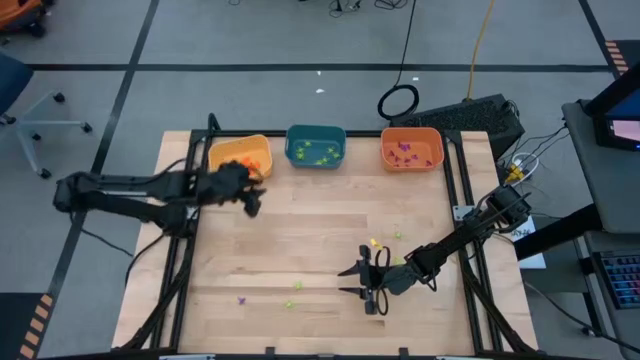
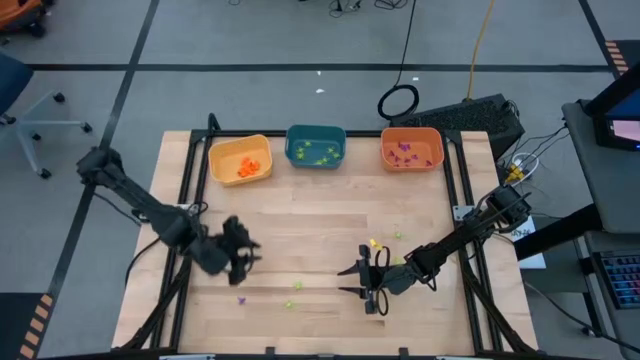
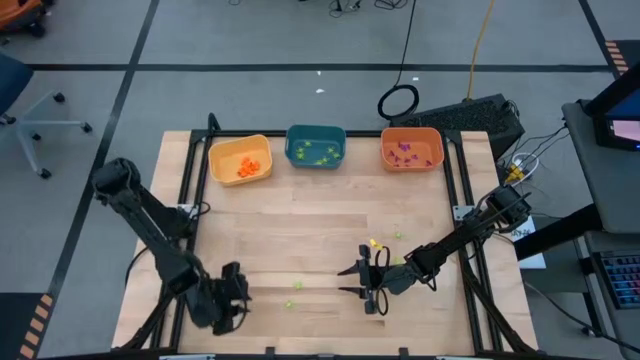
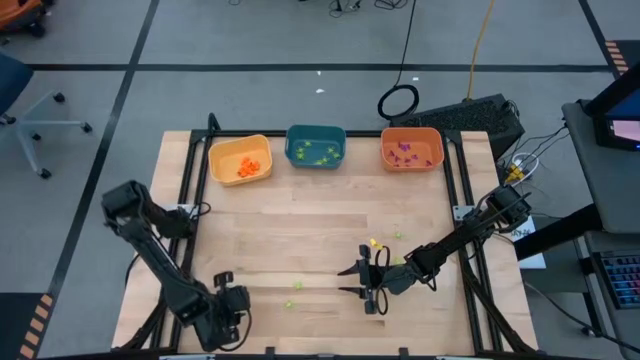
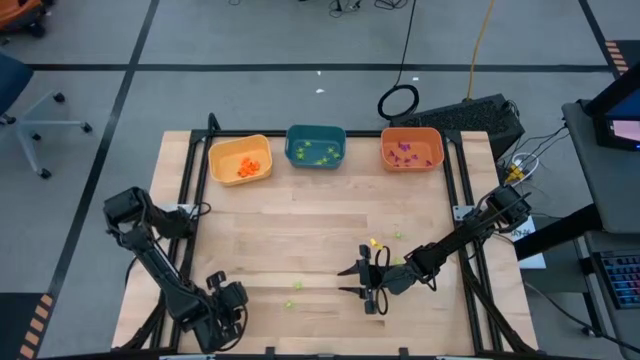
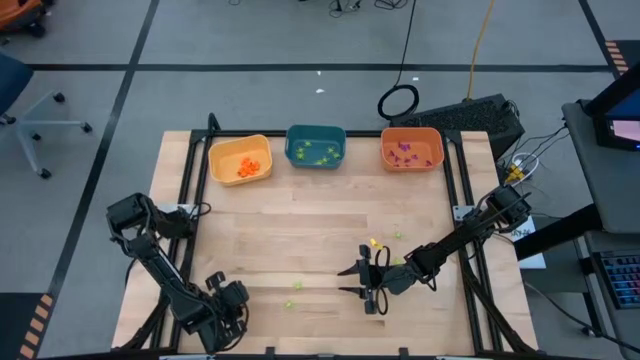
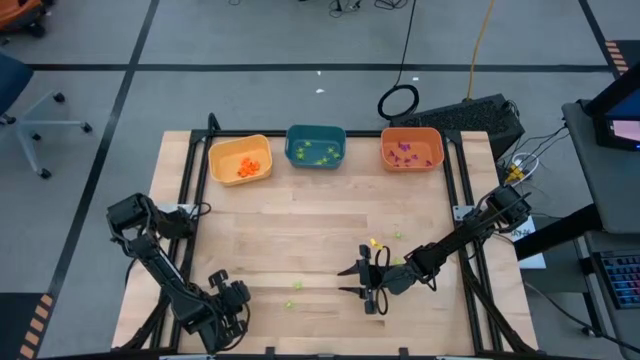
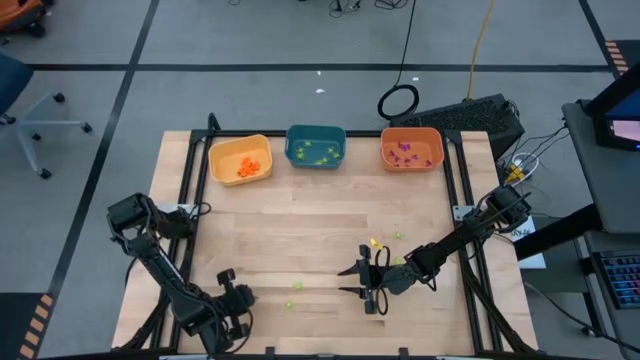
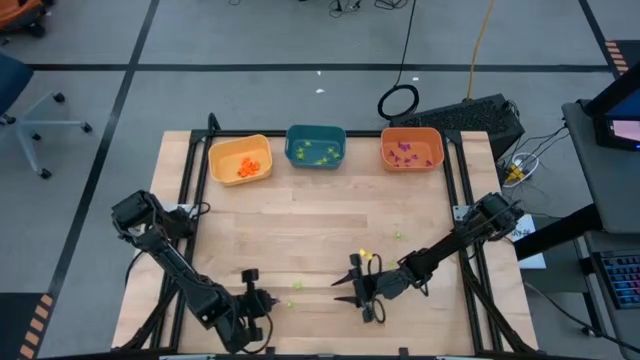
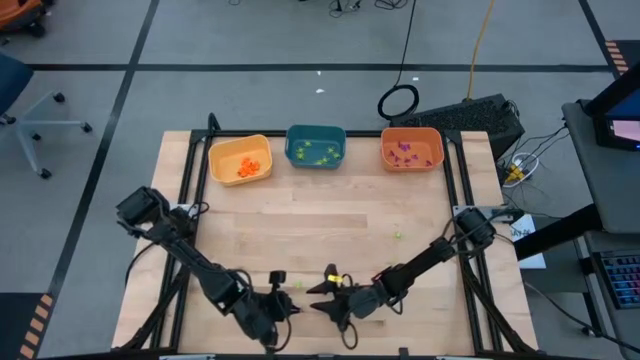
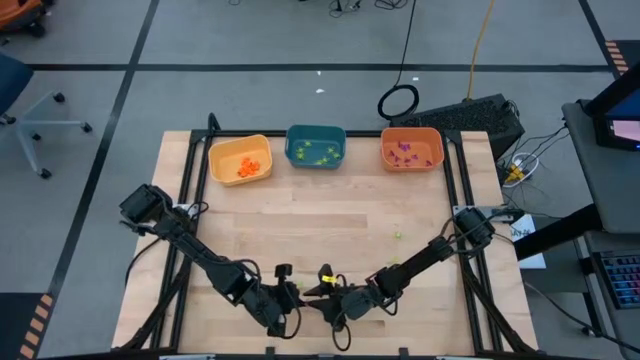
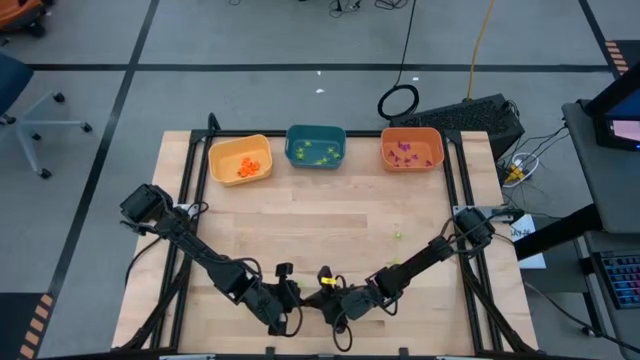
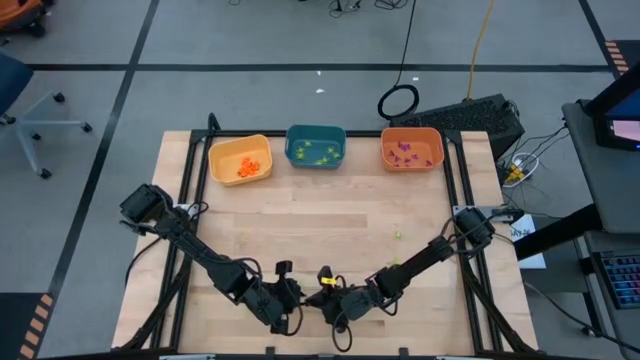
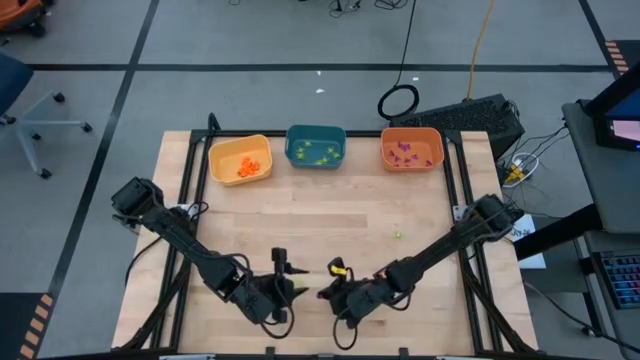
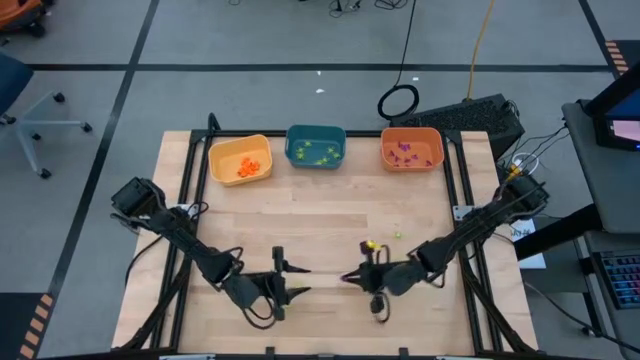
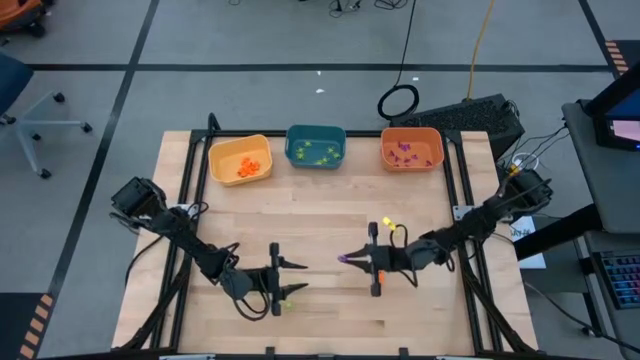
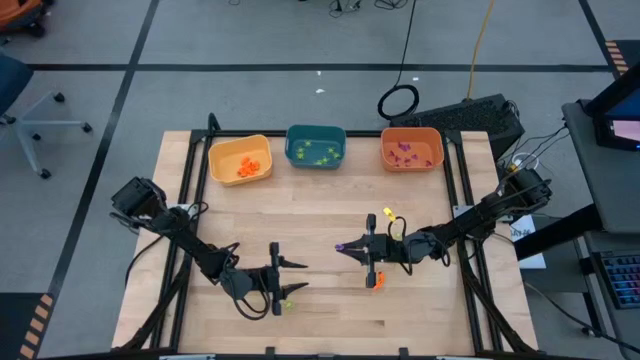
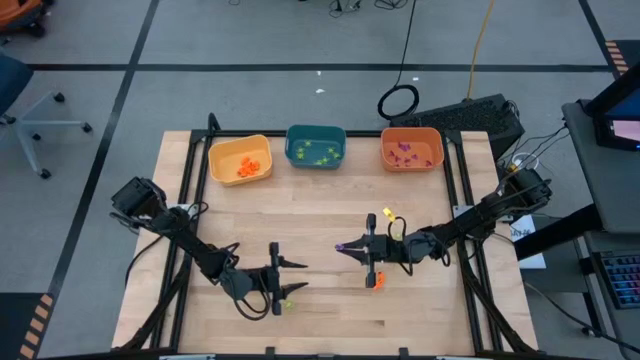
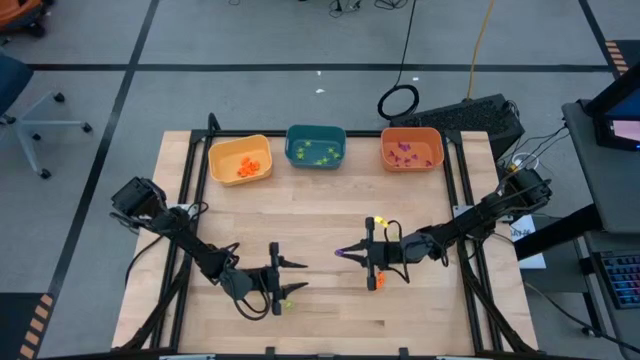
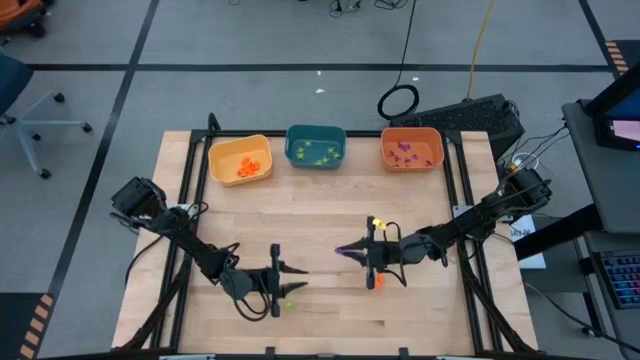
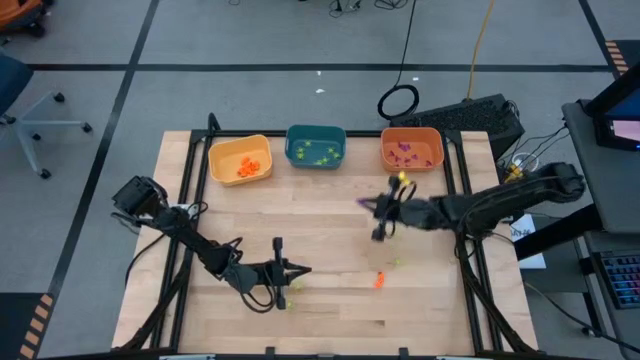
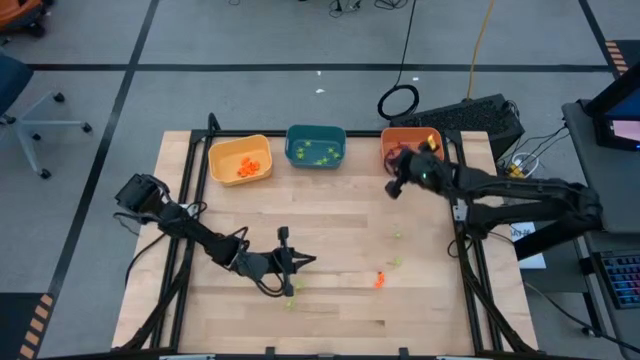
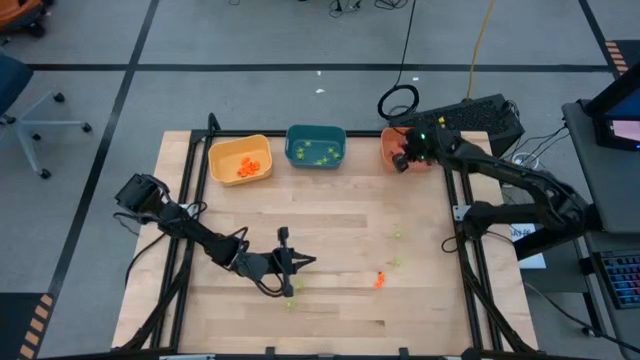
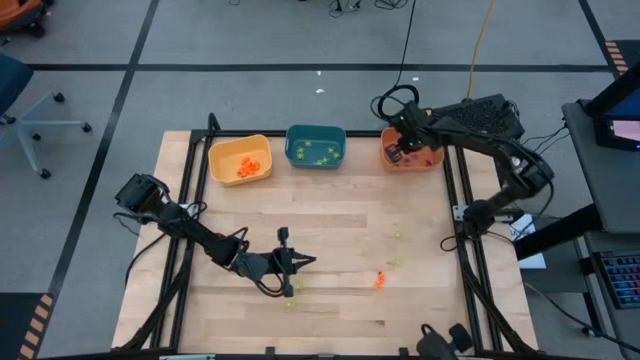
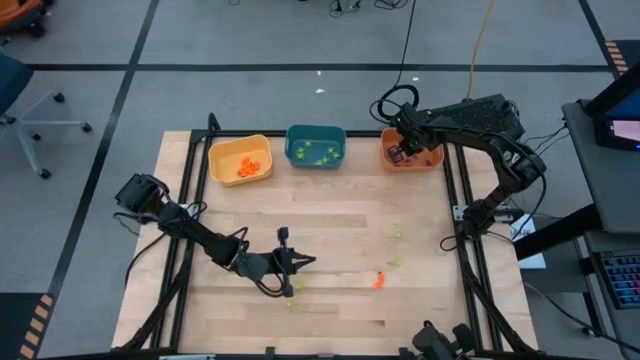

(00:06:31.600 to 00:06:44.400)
Task: Sort Halloween decoration
Put the violet witch hat toy into the orange bin

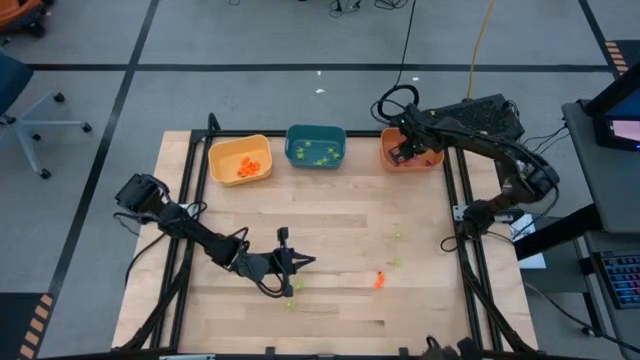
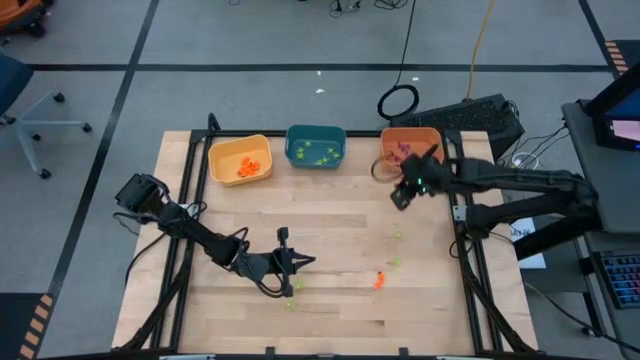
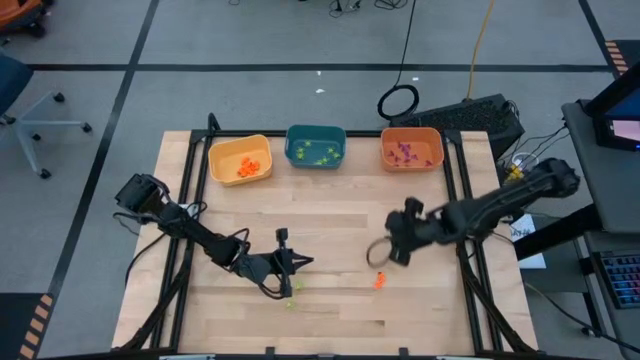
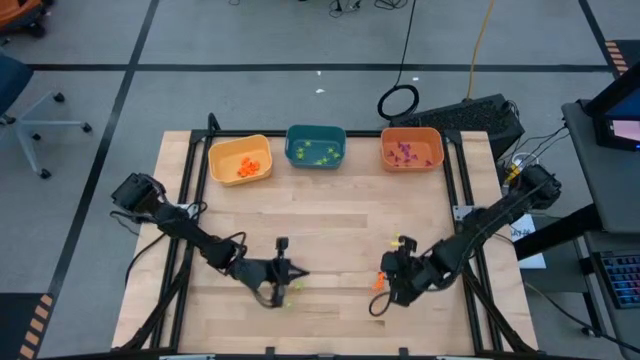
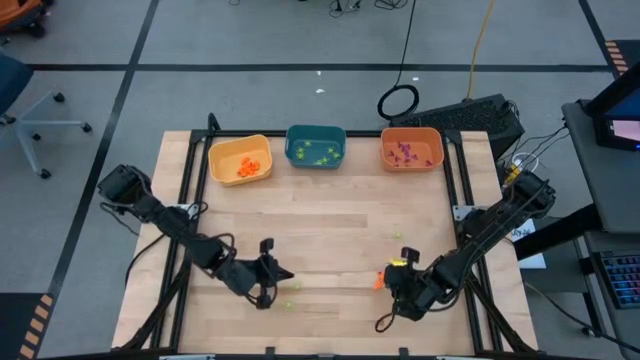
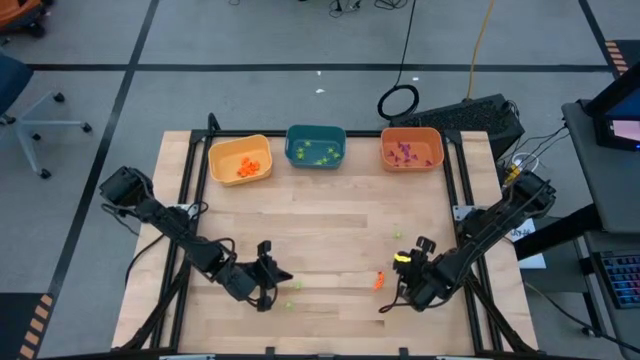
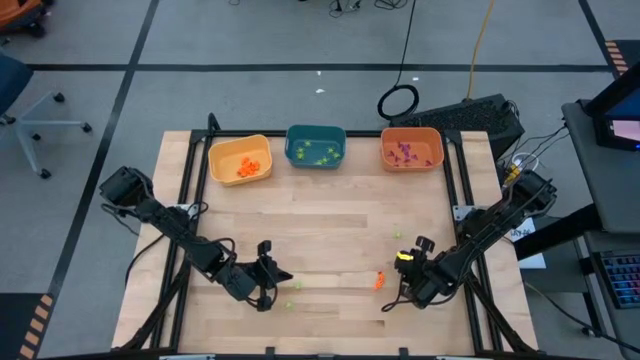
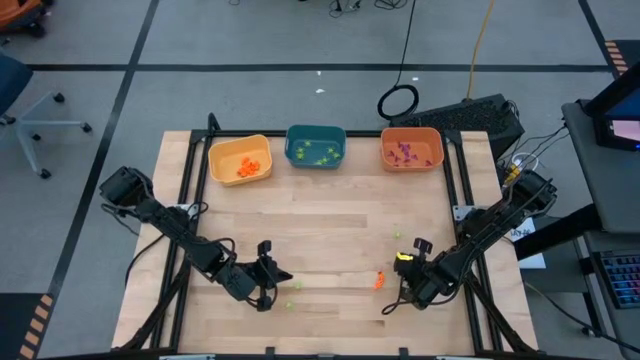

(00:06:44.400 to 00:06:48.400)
Put the green spider toy into the blue bin

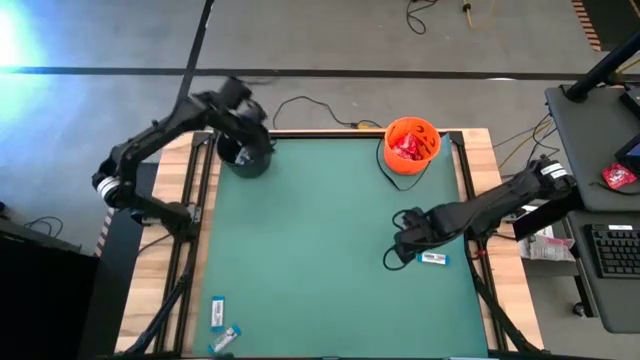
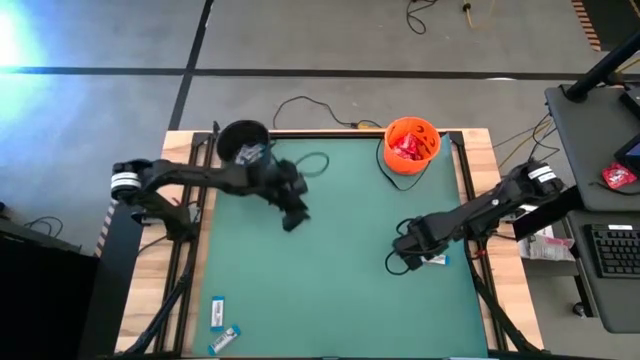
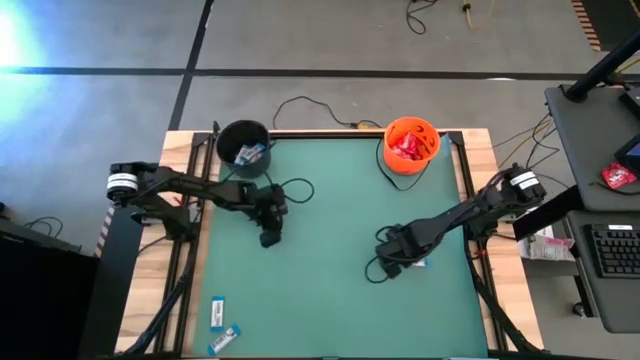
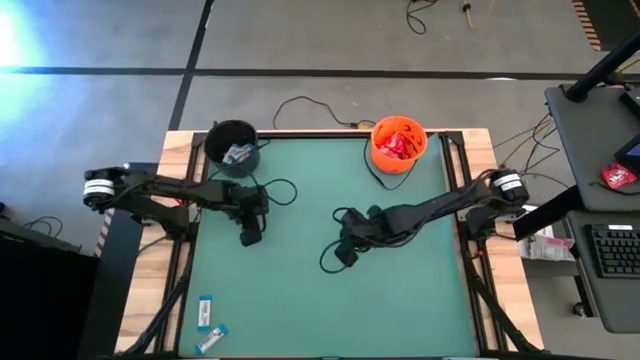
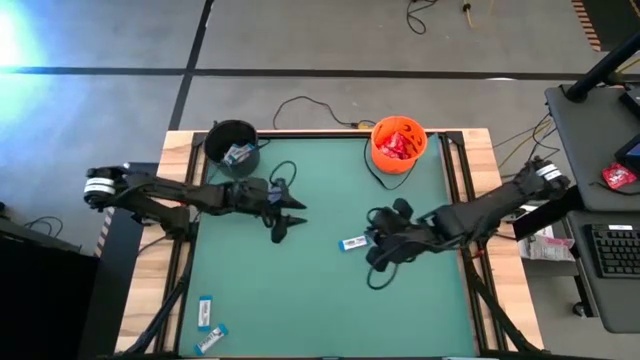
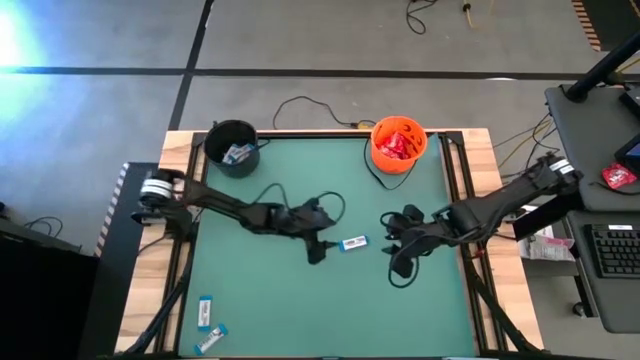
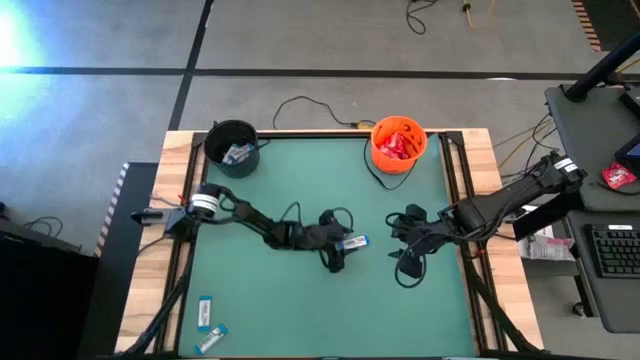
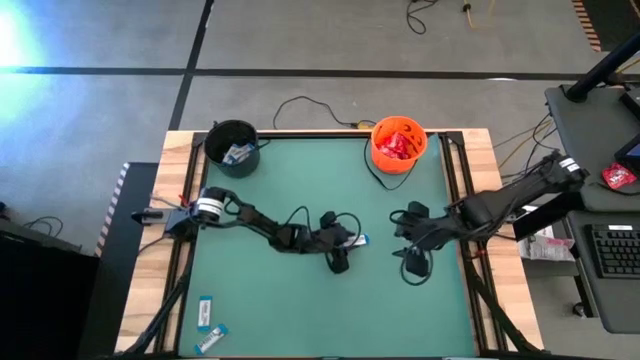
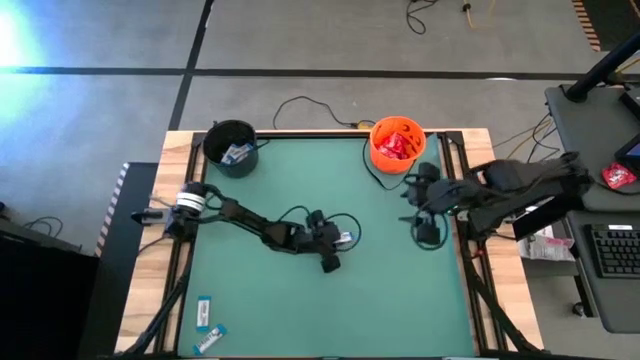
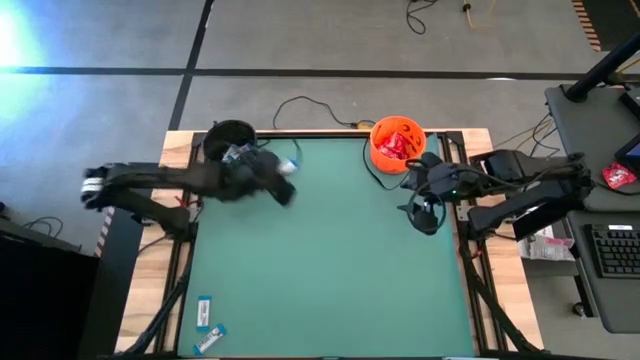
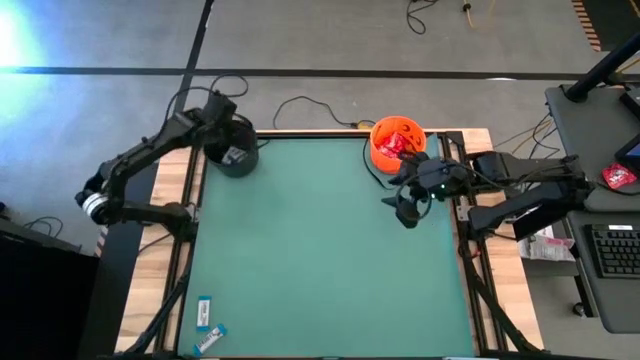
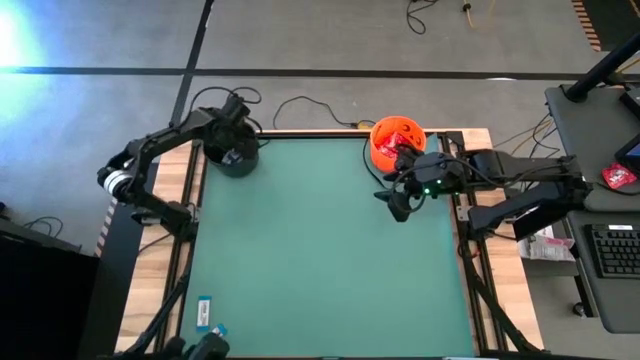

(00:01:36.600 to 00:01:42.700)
Task: Sort candy by brand, put in halloween buckets
Put the white candy into the black bucket
